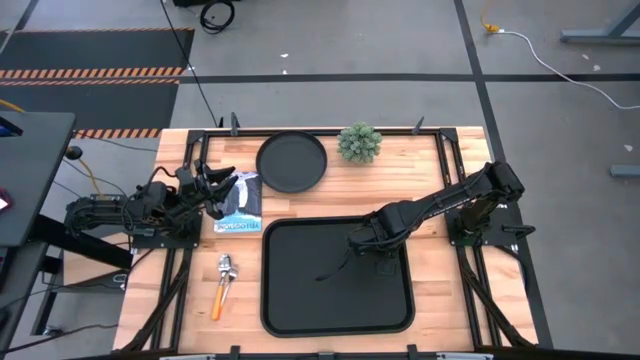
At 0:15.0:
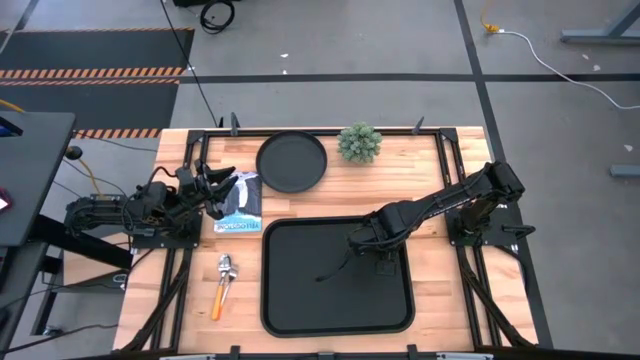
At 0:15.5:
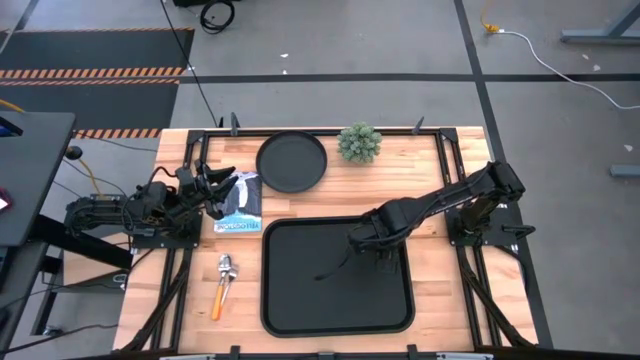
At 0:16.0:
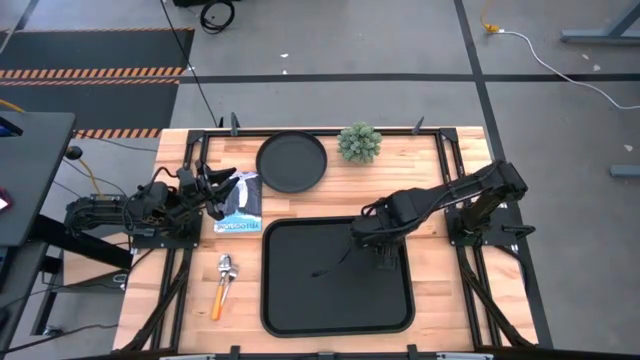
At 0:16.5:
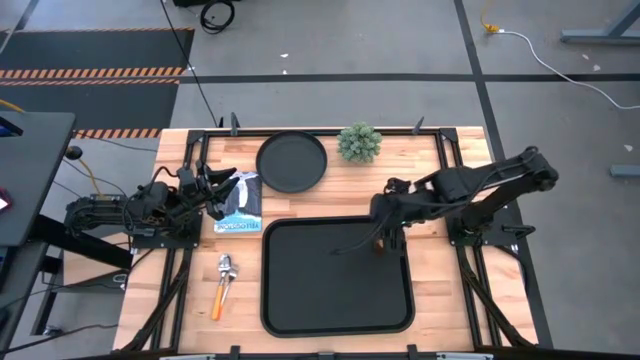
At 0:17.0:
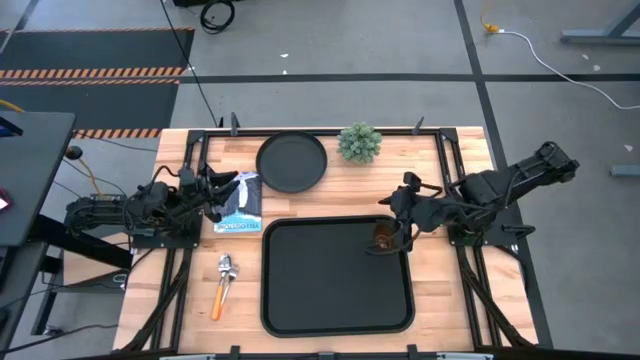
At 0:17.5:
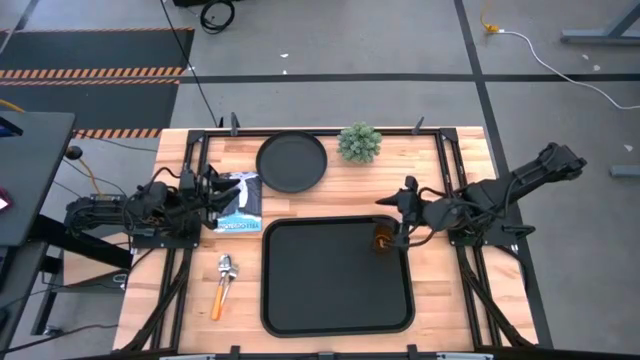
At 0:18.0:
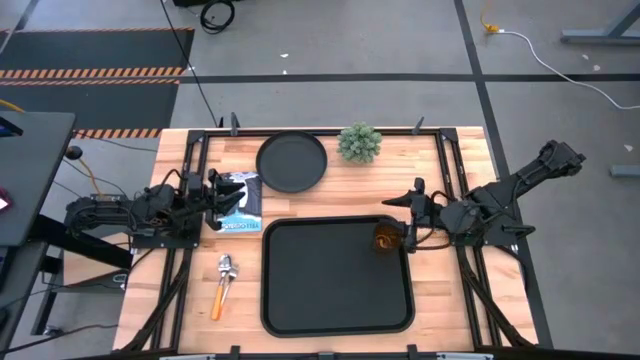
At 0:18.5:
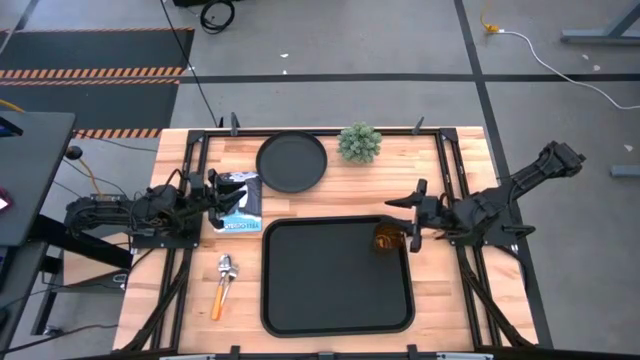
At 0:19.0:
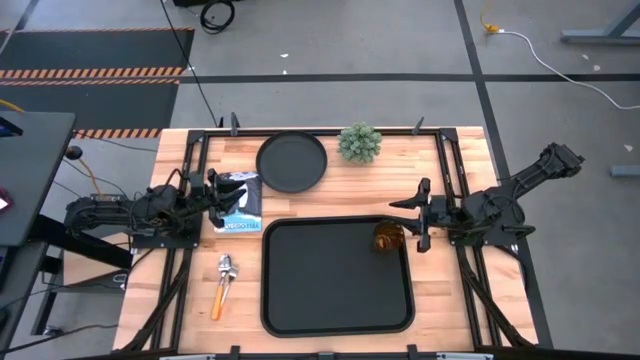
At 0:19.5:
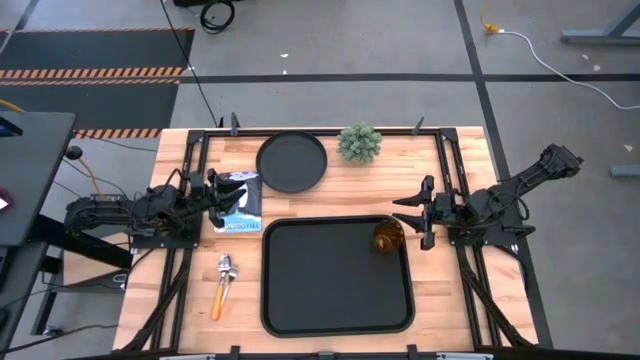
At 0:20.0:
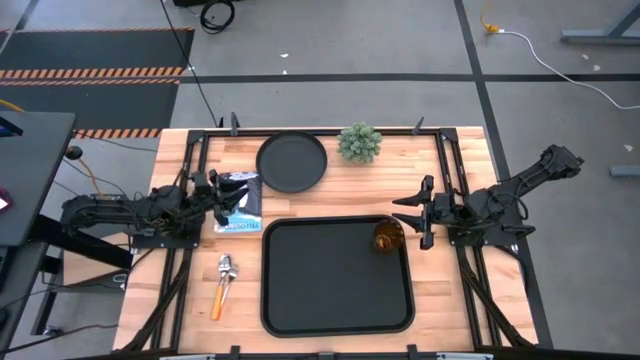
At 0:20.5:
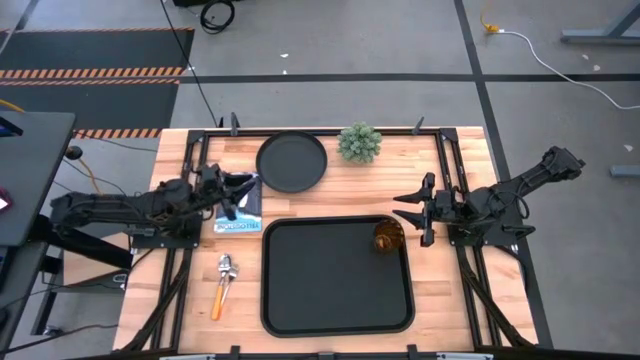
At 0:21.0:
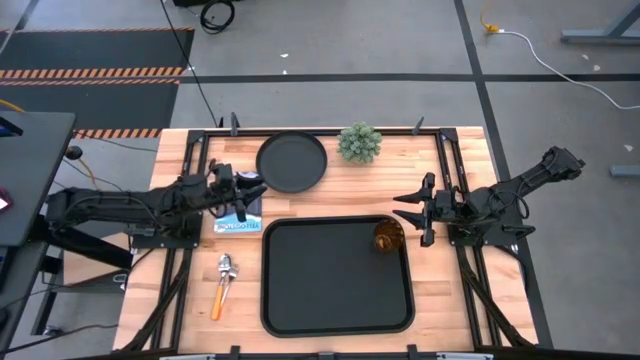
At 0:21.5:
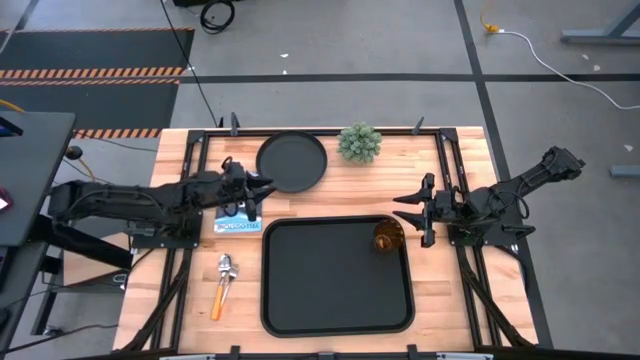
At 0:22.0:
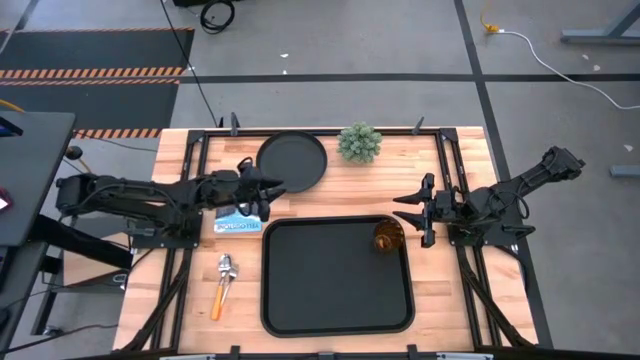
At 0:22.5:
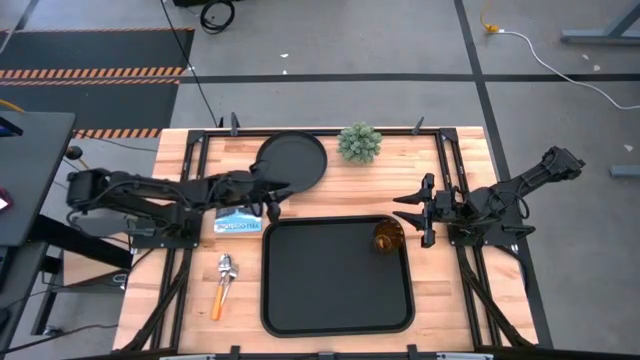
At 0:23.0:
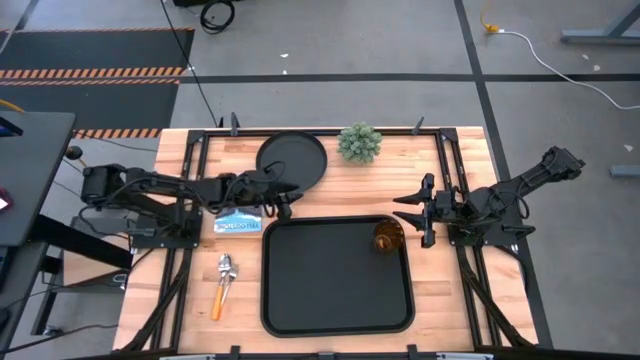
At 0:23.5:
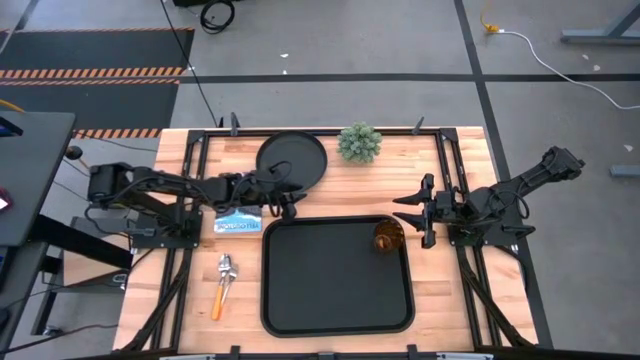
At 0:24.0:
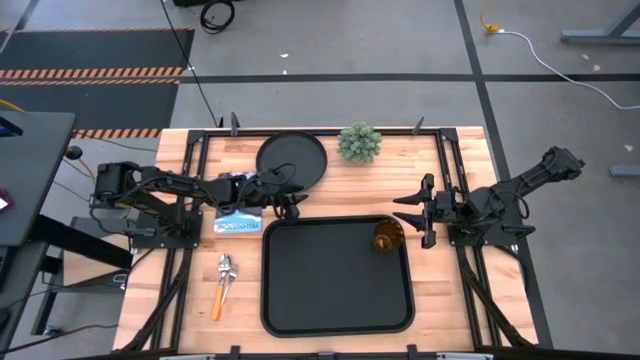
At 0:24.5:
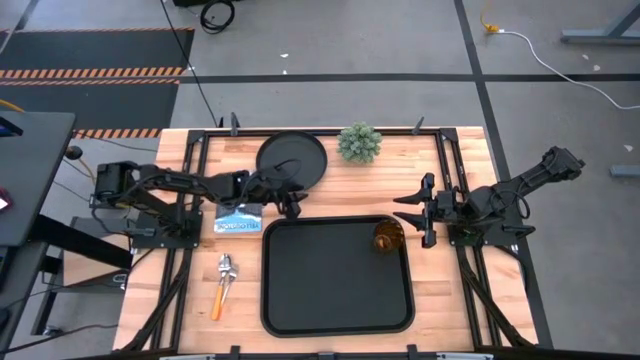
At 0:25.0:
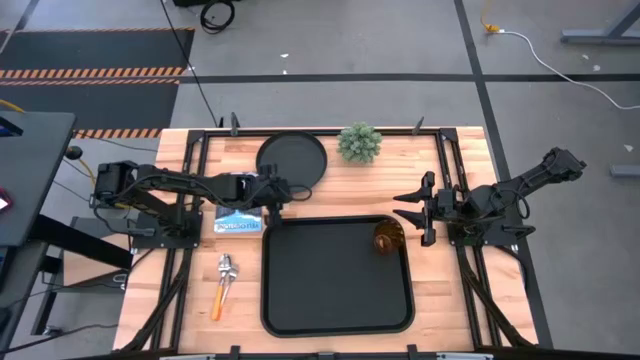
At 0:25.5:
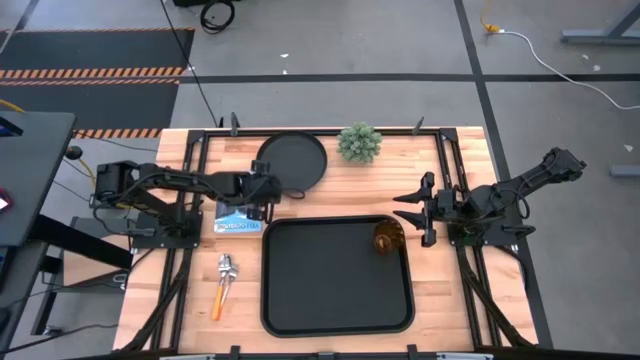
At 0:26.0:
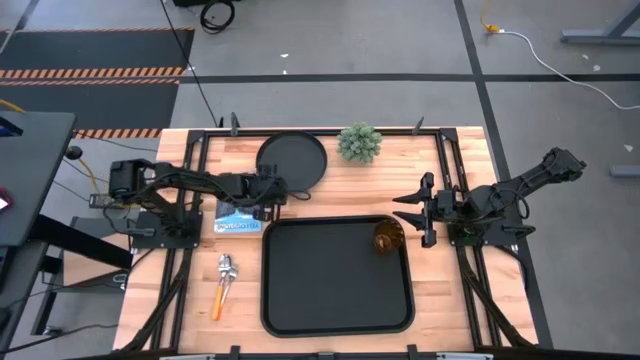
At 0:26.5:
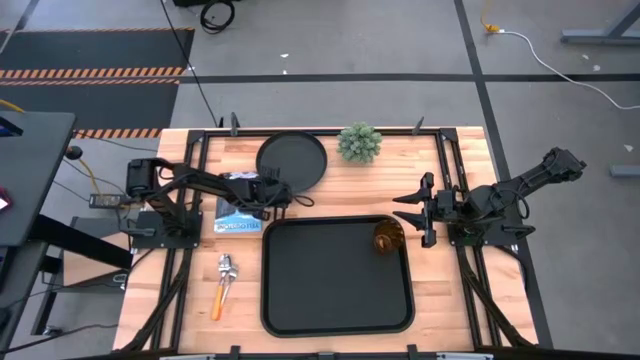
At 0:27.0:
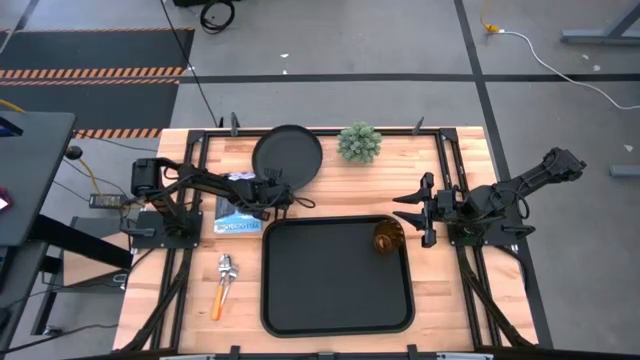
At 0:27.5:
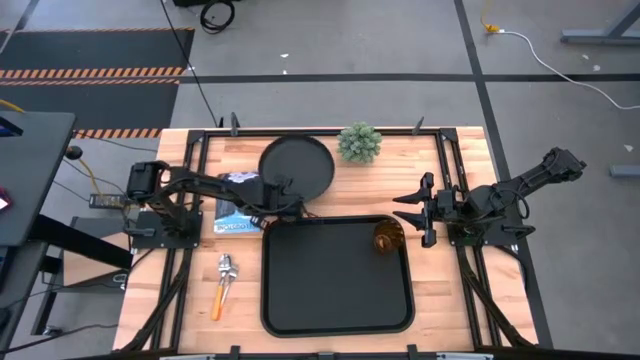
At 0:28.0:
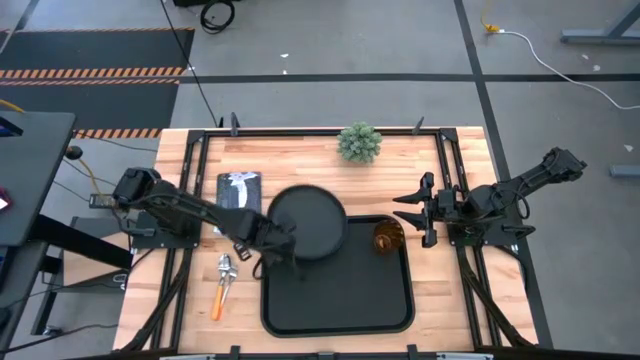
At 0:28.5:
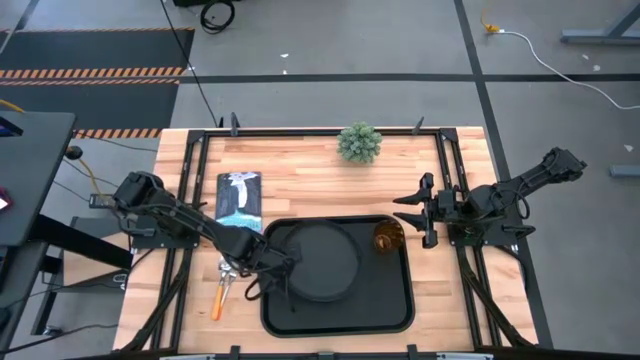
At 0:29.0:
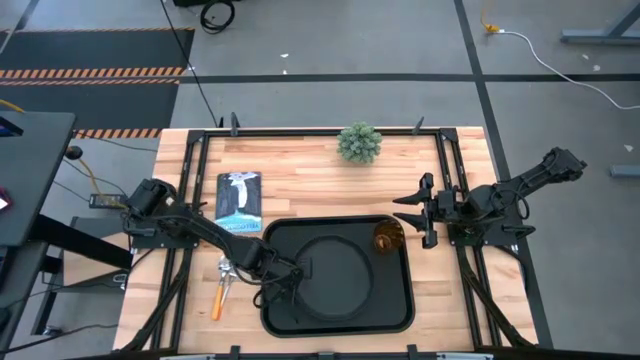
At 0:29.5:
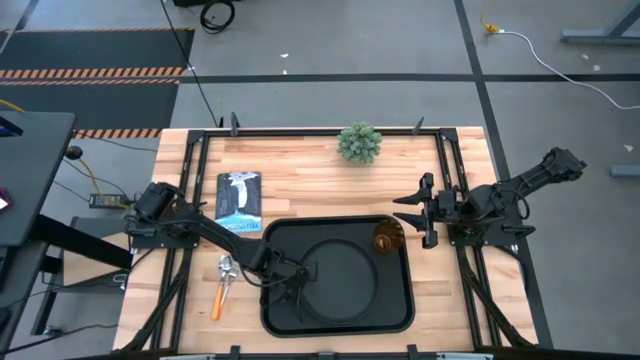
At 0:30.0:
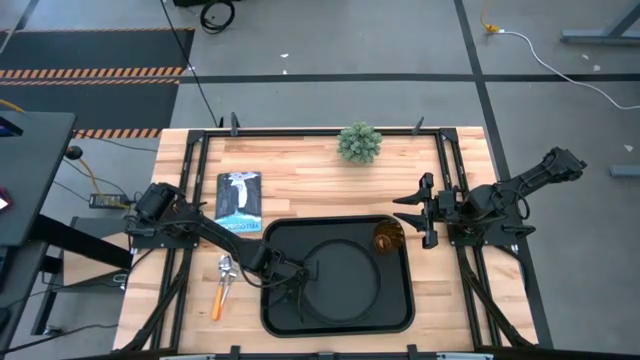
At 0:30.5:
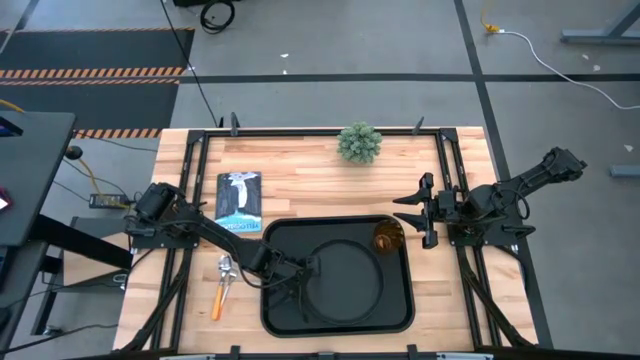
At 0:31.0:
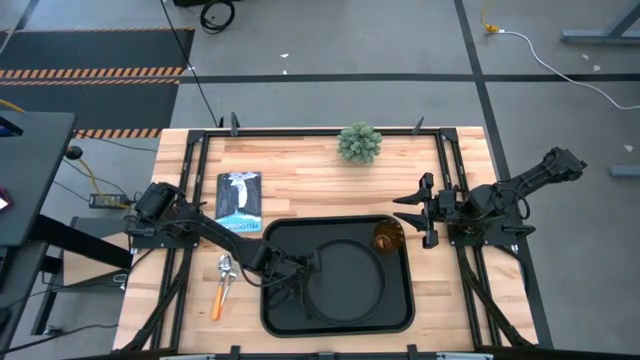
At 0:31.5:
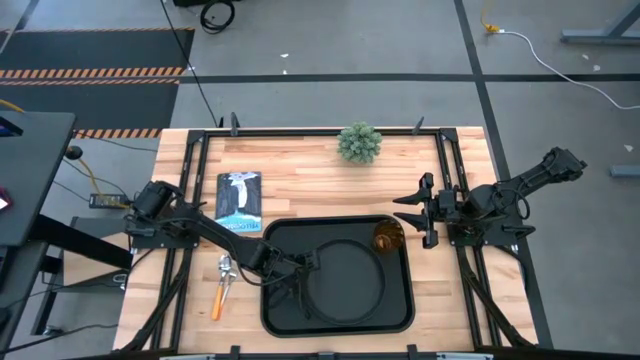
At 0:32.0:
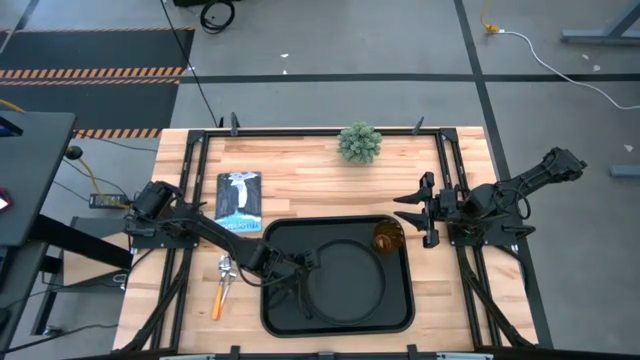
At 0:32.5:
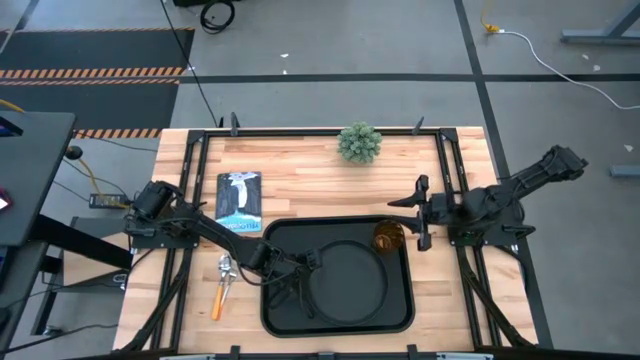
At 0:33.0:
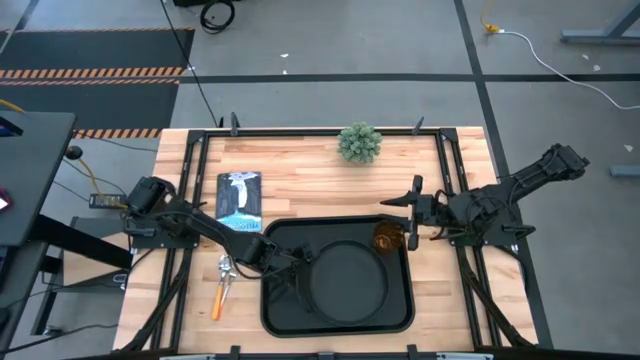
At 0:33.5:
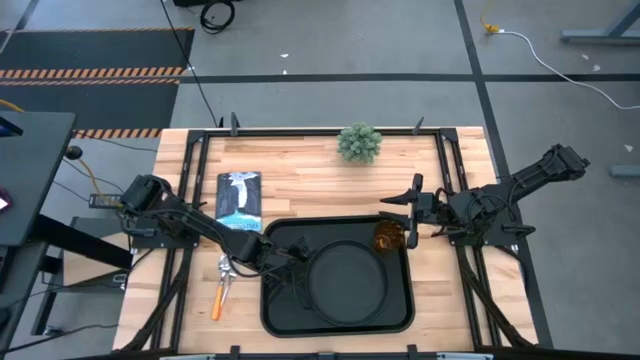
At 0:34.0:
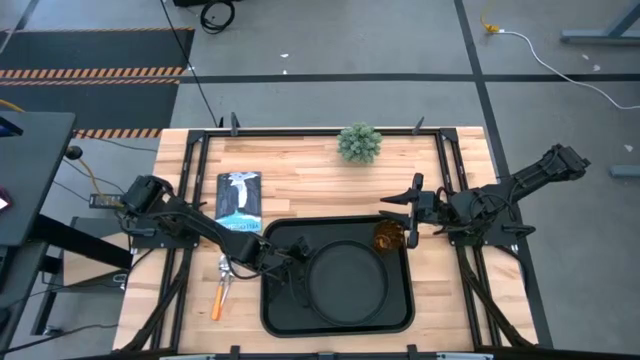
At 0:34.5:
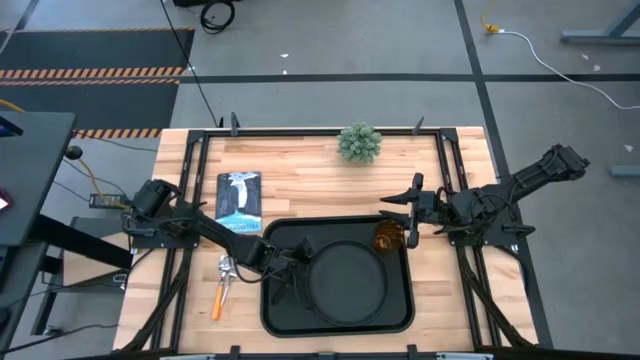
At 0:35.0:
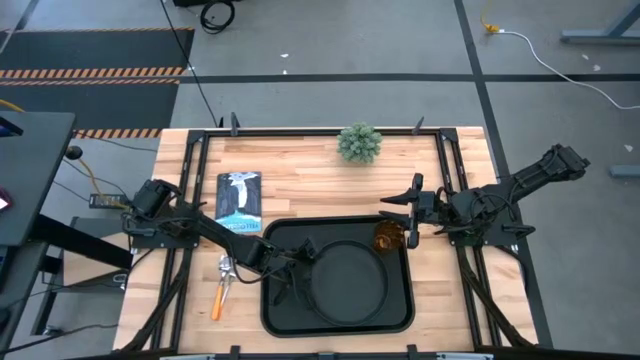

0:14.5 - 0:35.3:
Task: Pick and place plate/cup/fork/spoon on tray
Put the black plate on the black tray
